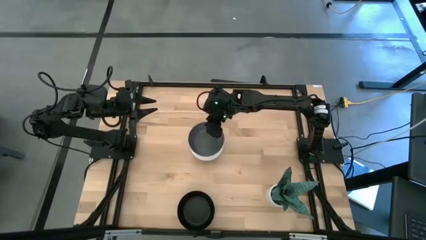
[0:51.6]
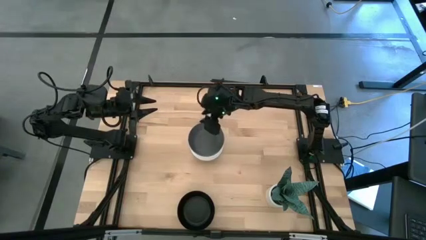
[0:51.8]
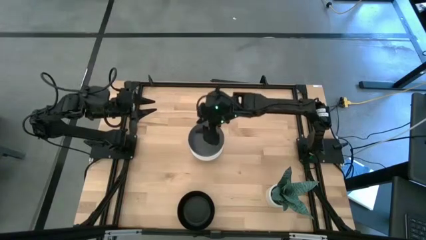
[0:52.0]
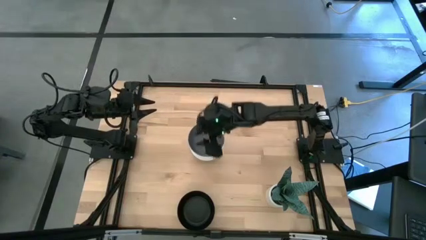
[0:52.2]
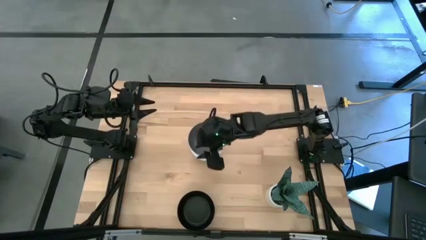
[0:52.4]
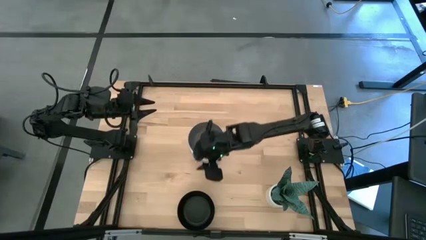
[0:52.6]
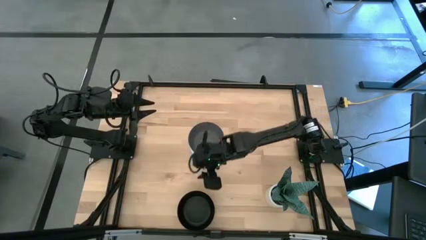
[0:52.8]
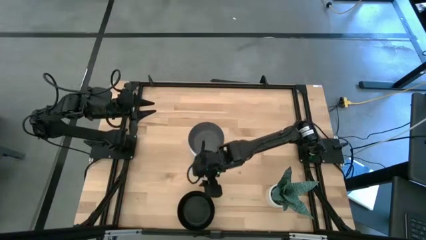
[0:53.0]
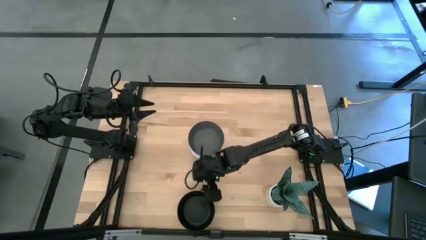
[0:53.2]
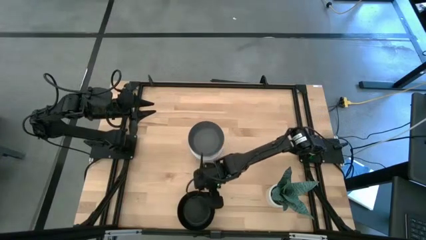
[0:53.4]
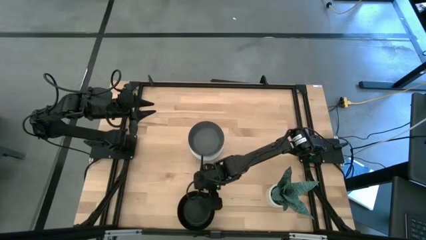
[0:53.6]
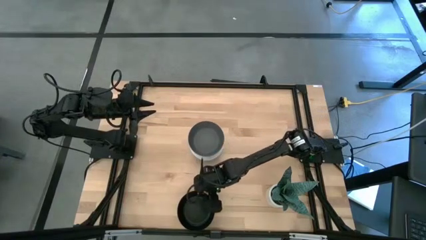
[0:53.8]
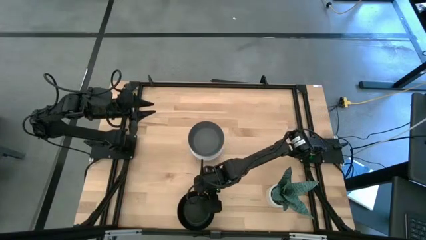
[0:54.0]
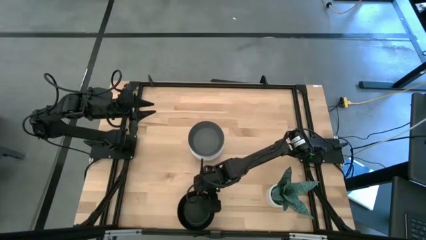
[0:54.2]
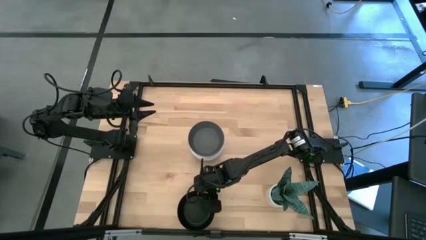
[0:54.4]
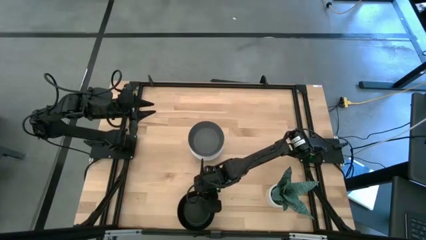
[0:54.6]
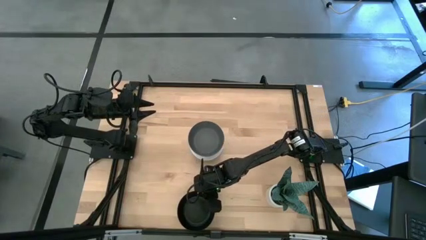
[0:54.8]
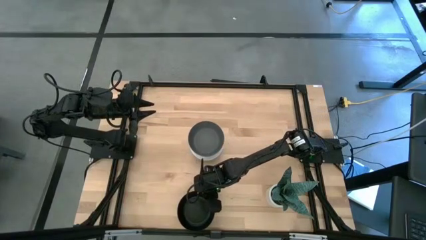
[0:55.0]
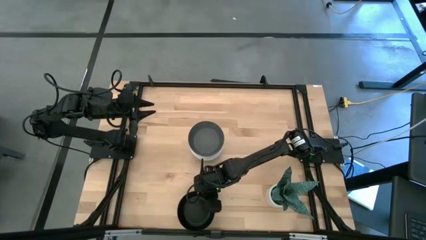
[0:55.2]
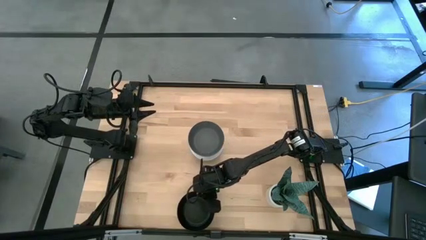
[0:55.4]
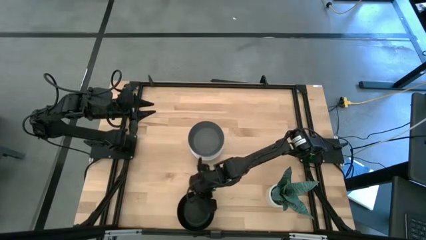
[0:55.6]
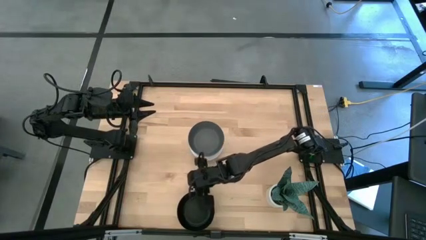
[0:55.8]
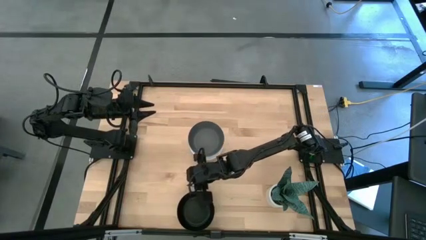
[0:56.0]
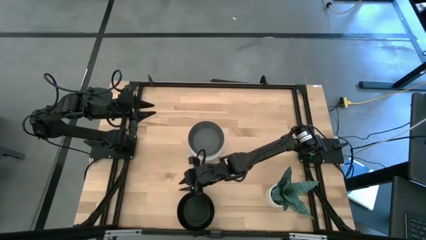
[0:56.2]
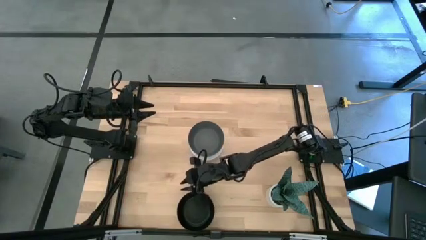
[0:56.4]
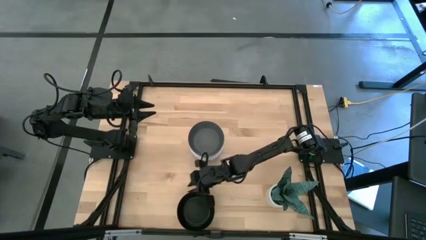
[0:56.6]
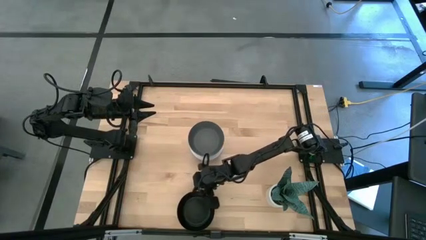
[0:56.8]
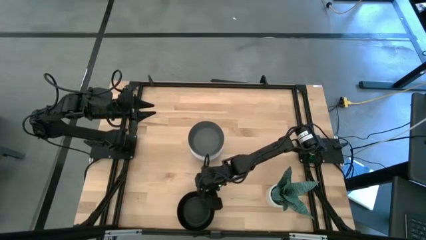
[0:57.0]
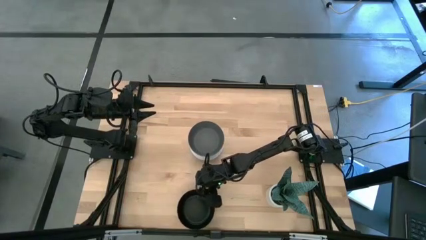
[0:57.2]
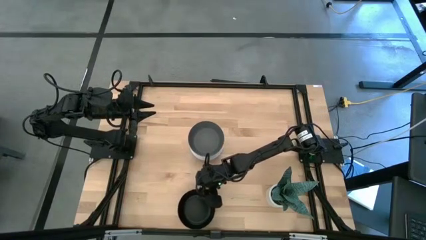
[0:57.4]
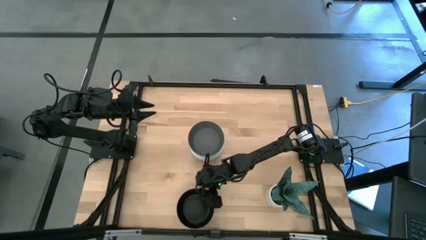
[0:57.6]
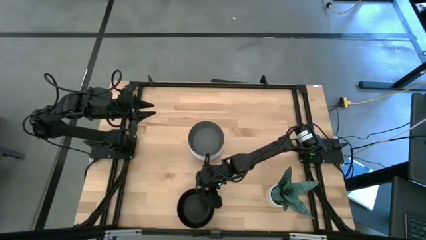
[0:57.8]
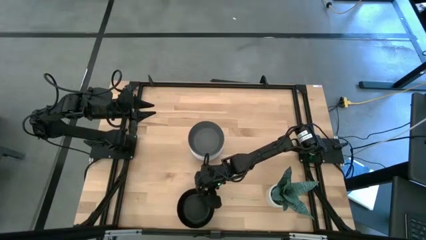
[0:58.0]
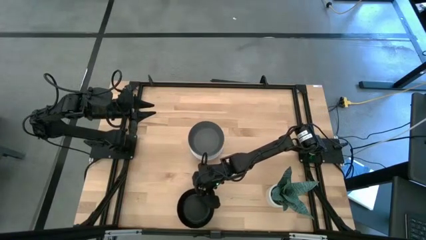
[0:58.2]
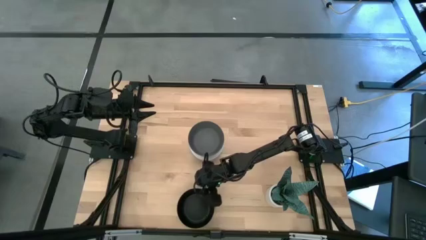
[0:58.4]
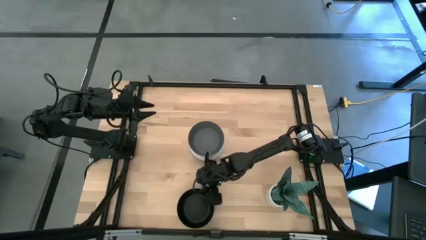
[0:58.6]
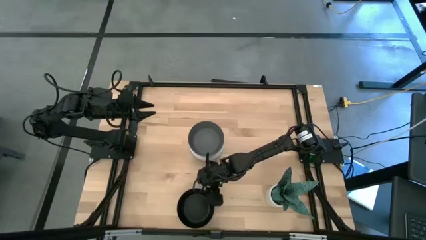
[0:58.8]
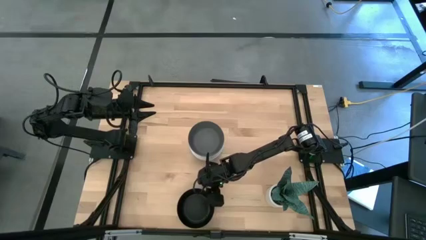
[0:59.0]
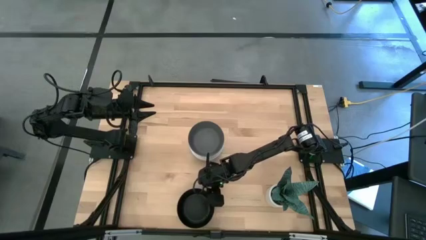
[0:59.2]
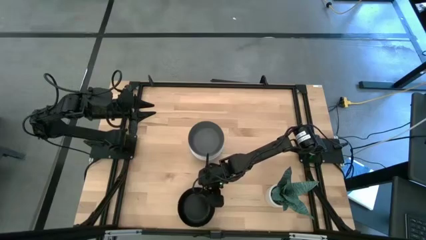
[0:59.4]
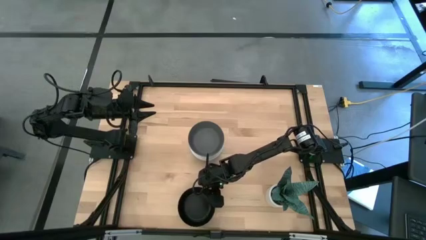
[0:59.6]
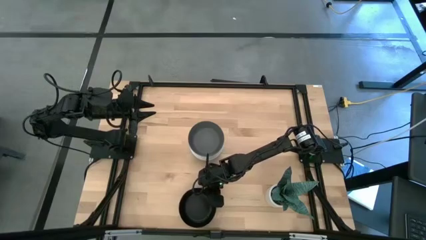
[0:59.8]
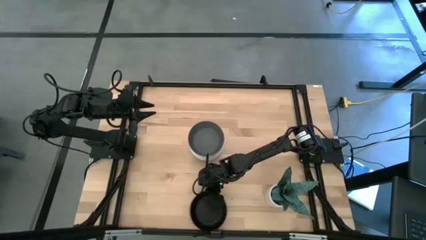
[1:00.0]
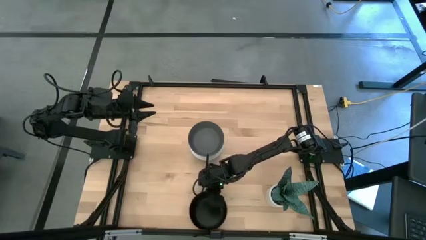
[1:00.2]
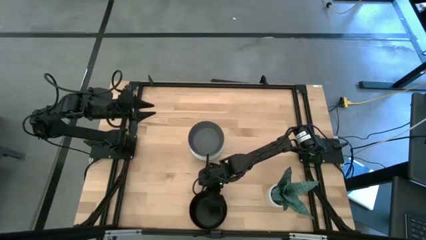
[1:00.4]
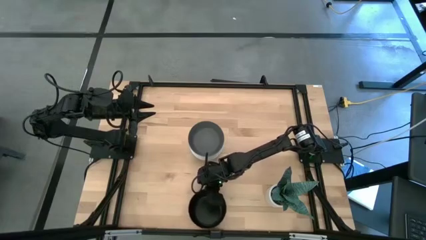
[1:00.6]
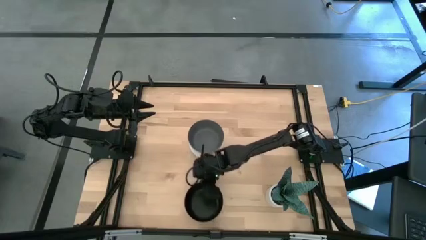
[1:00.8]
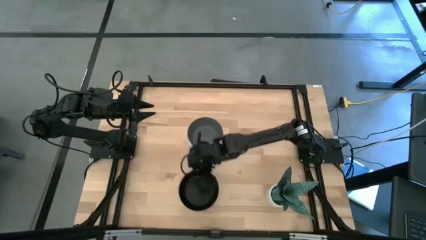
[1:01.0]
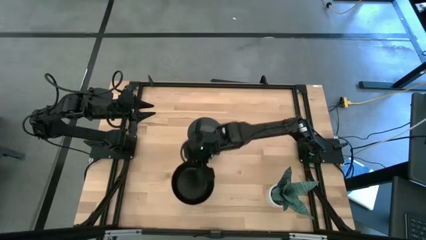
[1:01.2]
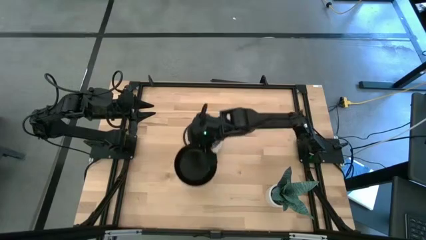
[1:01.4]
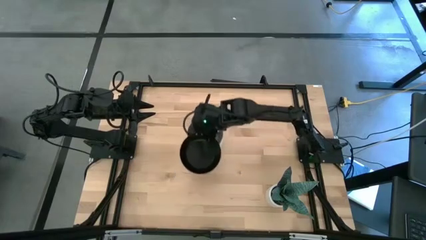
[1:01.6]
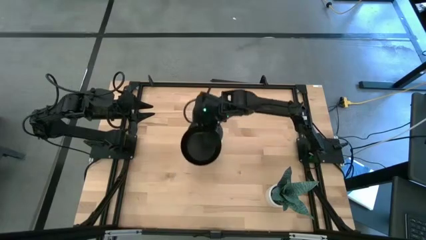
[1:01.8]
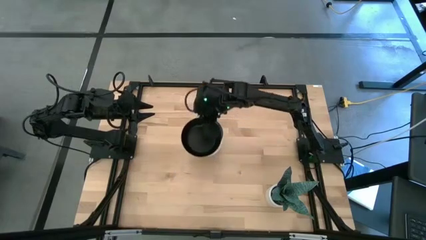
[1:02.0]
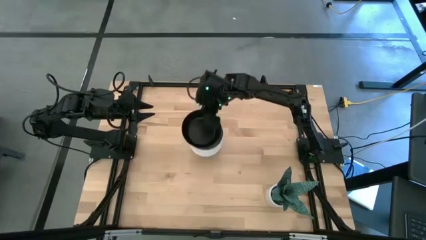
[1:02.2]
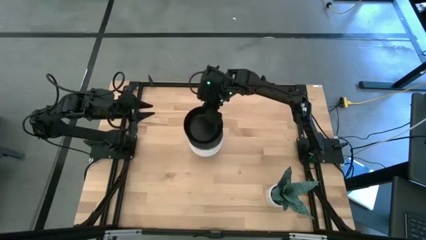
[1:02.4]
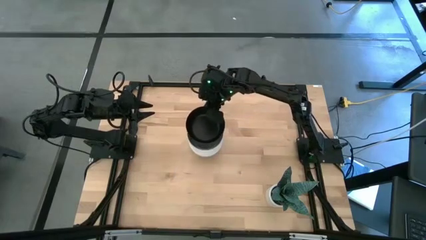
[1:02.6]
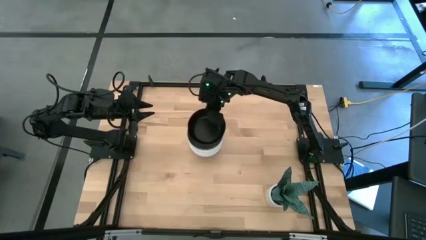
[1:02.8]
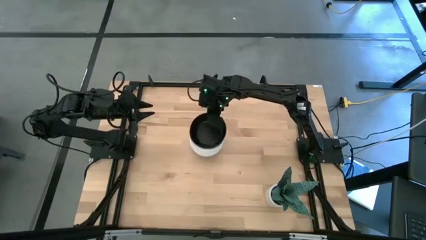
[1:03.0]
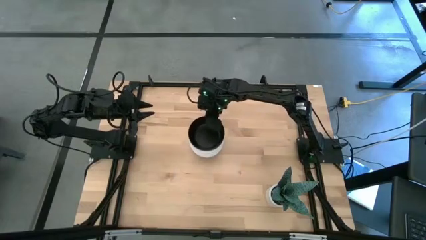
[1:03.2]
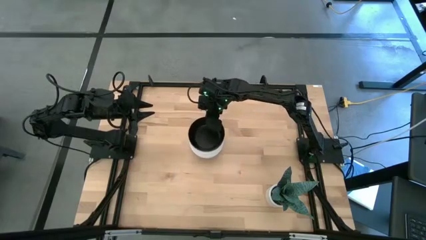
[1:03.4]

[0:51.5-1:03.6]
Task: Nest bowls inside each other
Stack the black bowl on the gray bowl

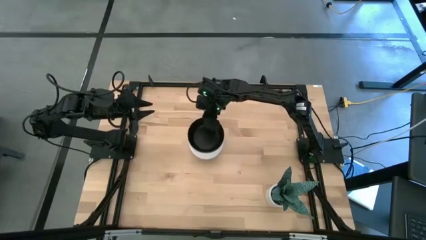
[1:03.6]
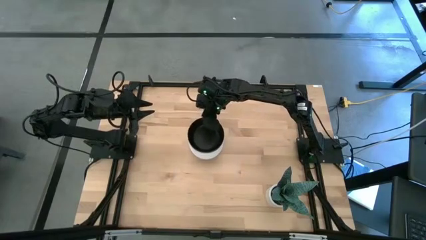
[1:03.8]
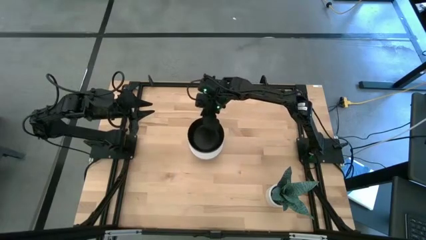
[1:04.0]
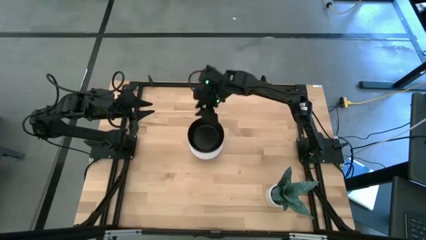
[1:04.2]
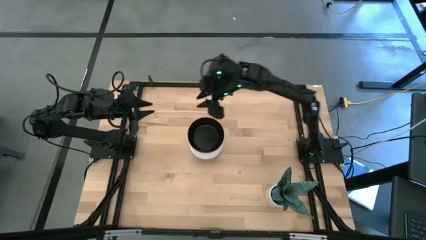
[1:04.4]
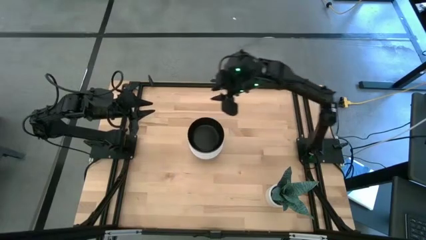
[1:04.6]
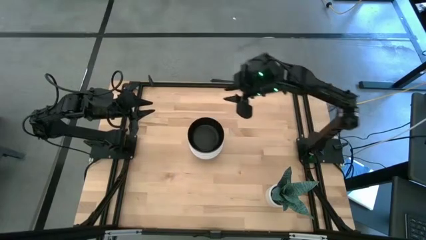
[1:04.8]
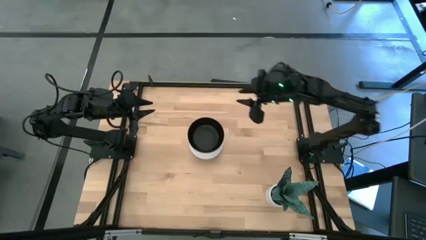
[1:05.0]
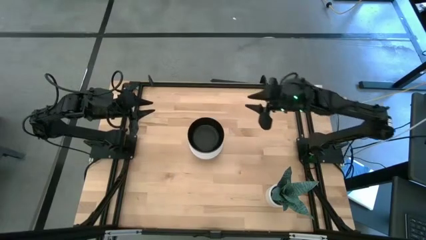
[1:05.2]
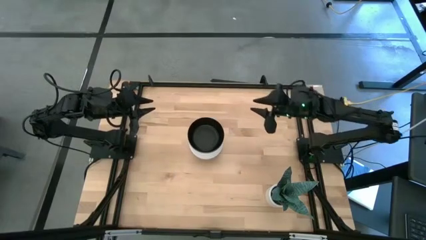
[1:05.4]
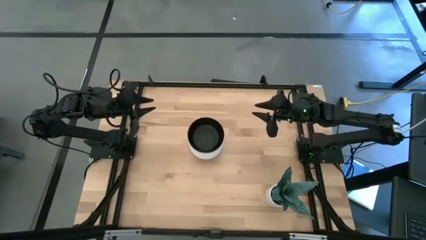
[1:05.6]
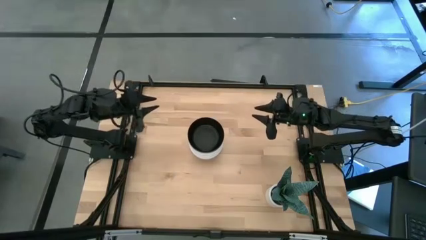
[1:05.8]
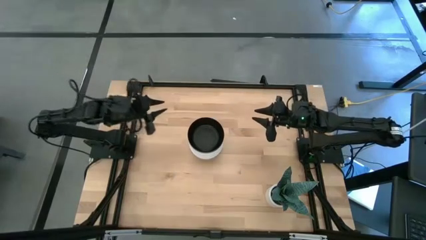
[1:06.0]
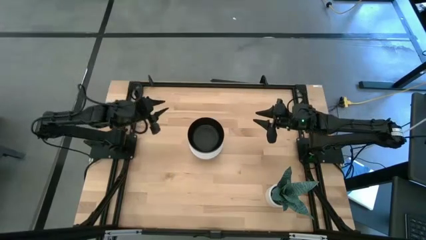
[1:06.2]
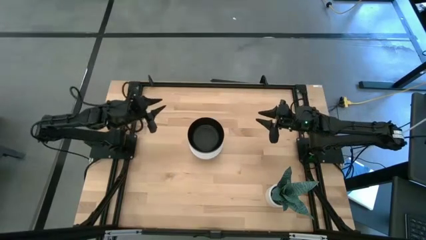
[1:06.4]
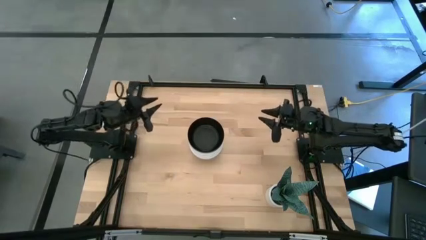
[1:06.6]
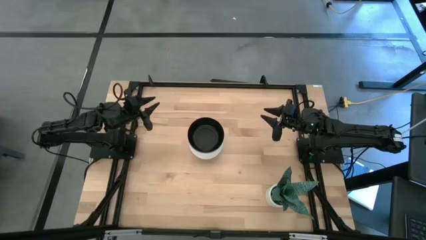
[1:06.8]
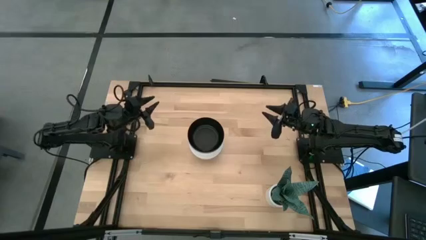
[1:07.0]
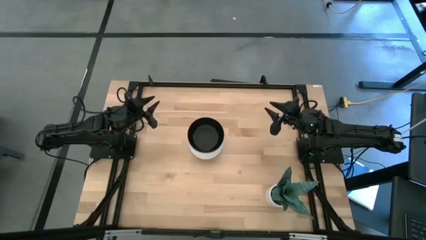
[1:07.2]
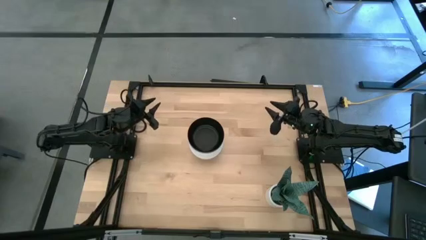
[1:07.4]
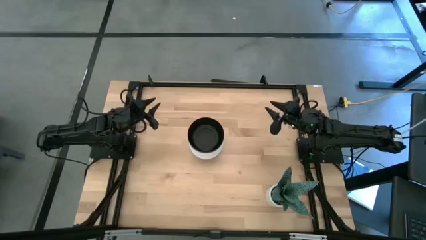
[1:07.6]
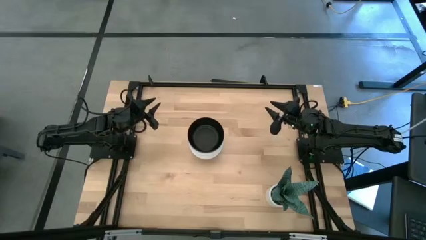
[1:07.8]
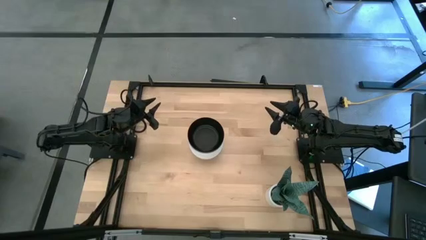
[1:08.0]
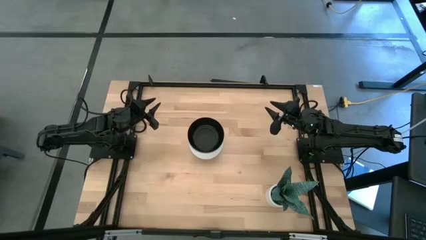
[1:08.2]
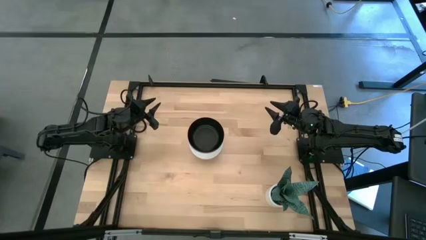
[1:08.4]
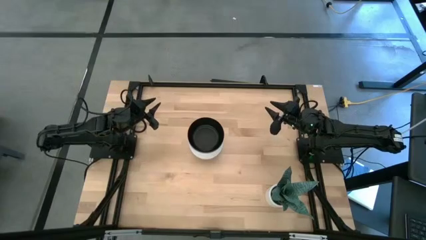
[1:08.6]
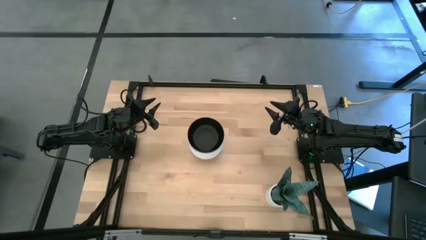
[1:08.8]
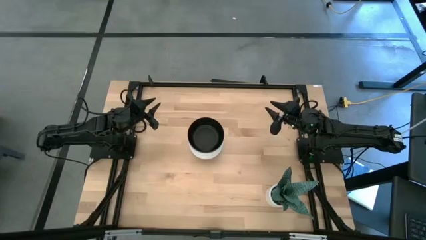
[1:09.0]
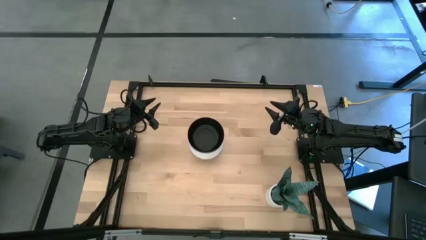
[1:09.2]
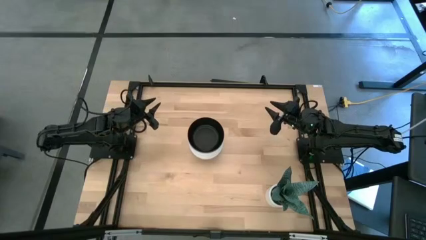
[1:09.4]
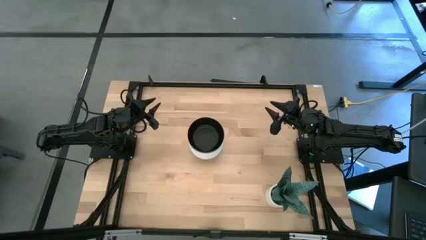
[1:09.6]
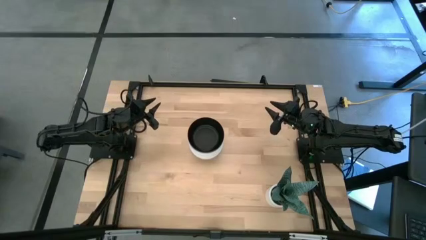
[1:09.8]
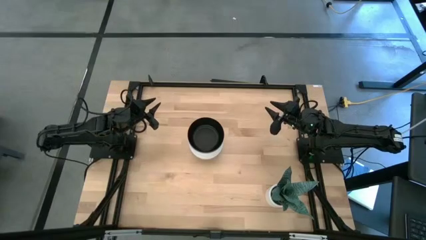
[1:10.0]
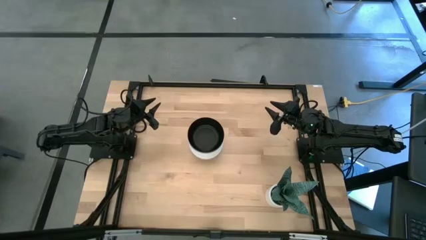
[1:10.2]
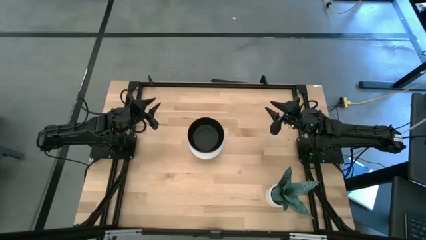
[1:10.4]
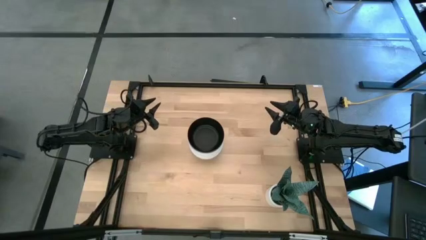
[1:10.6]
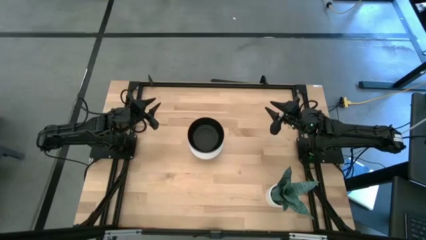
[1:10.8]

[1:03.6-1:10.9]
Return to Home Position
